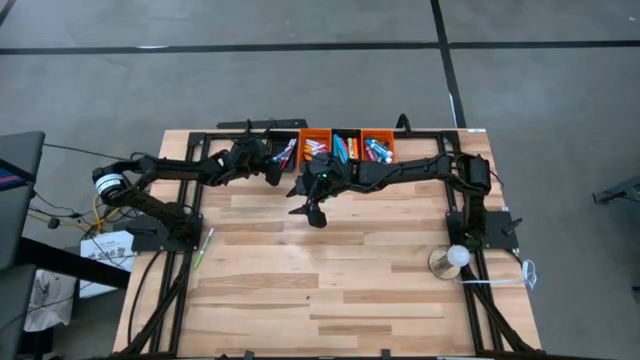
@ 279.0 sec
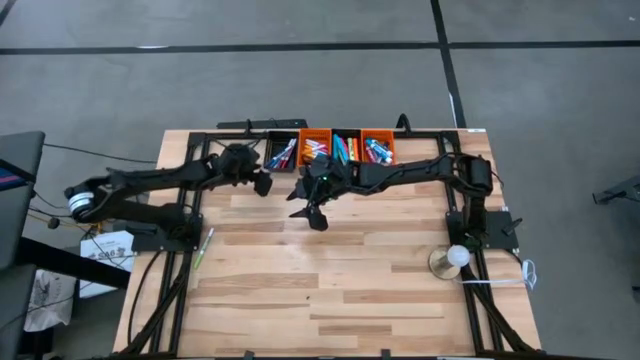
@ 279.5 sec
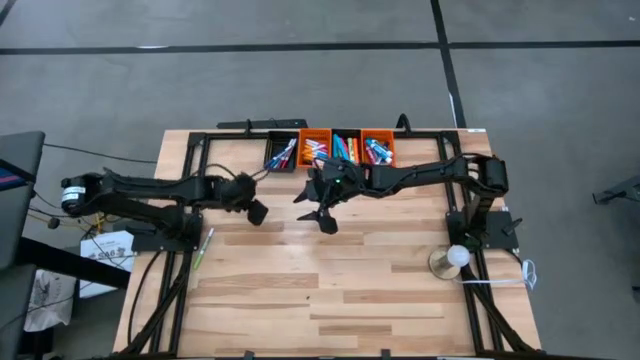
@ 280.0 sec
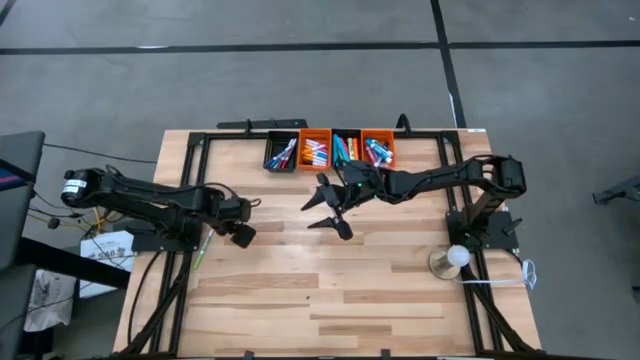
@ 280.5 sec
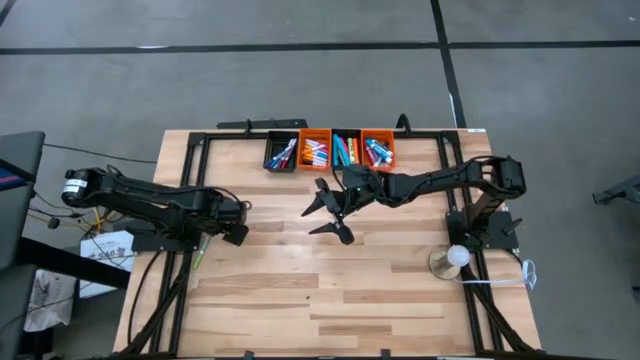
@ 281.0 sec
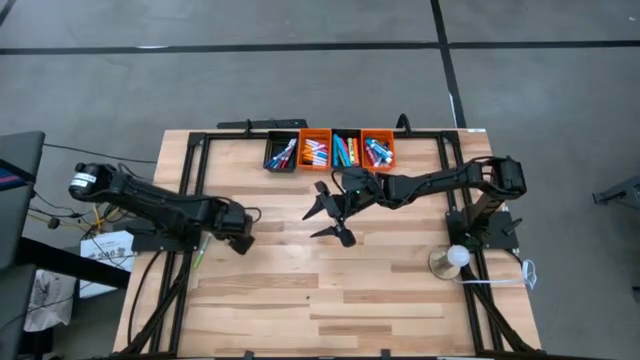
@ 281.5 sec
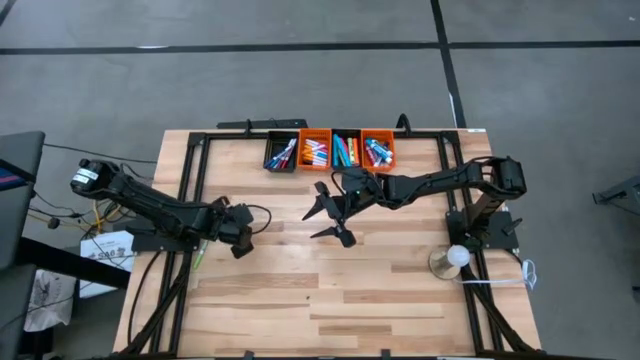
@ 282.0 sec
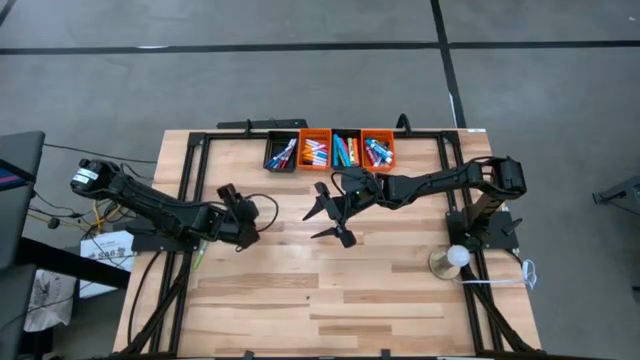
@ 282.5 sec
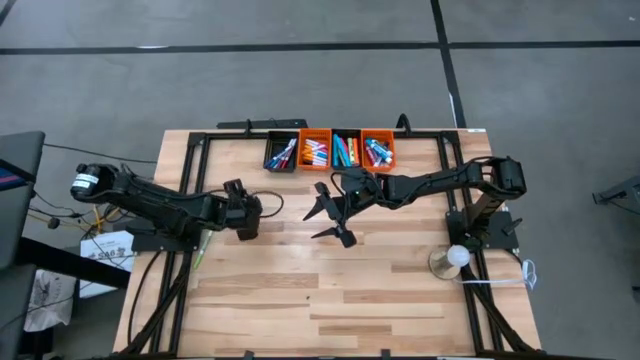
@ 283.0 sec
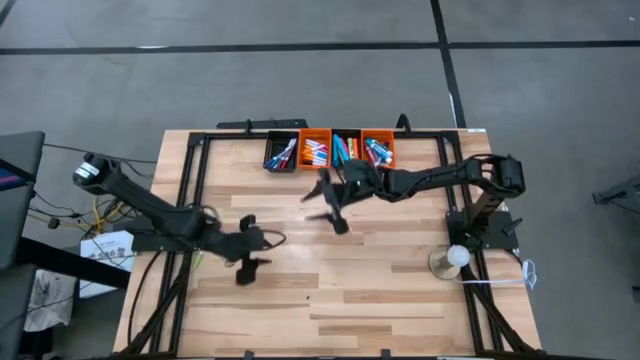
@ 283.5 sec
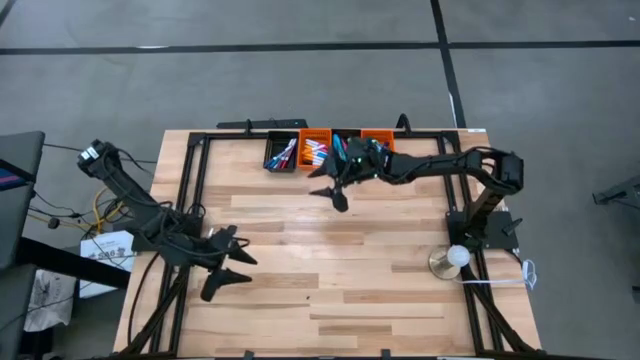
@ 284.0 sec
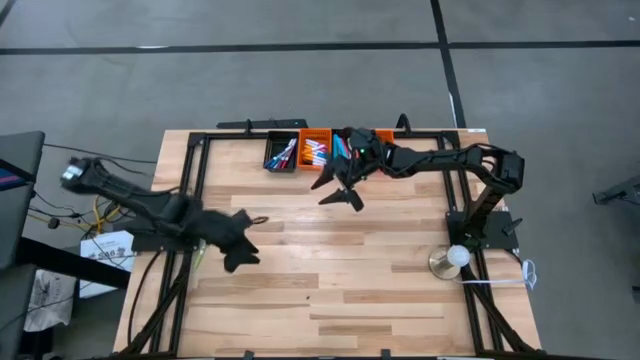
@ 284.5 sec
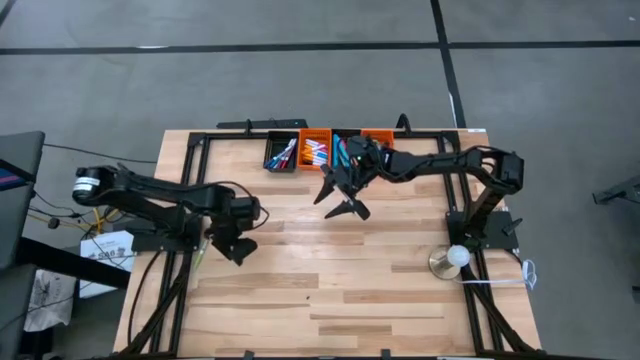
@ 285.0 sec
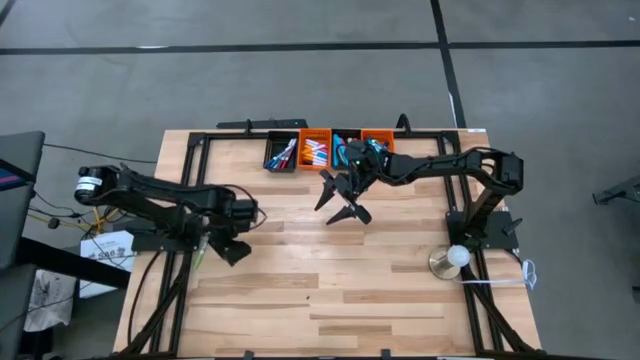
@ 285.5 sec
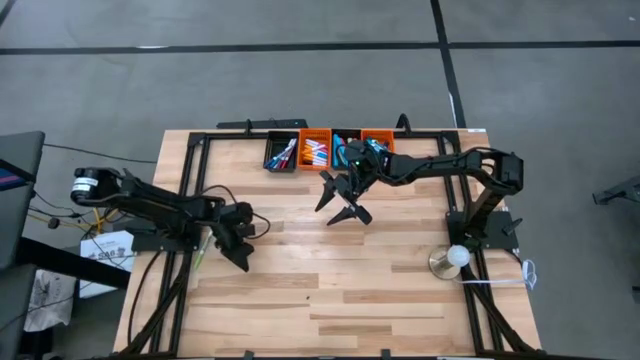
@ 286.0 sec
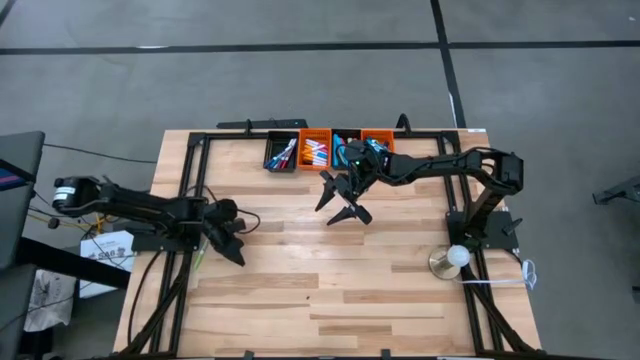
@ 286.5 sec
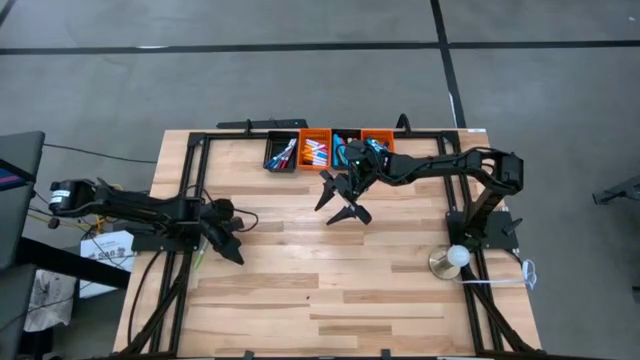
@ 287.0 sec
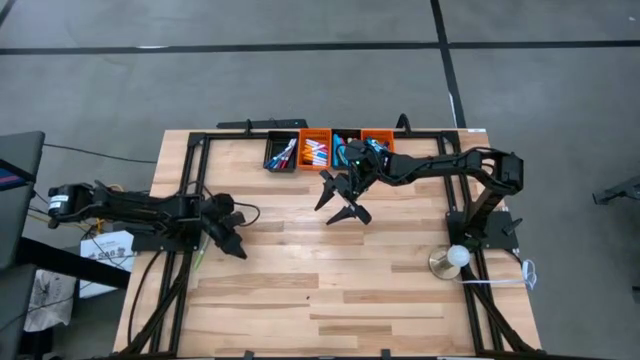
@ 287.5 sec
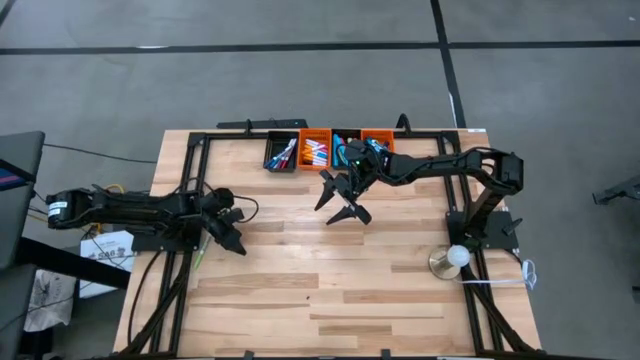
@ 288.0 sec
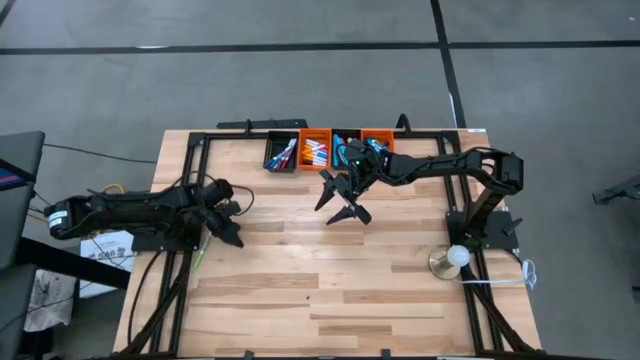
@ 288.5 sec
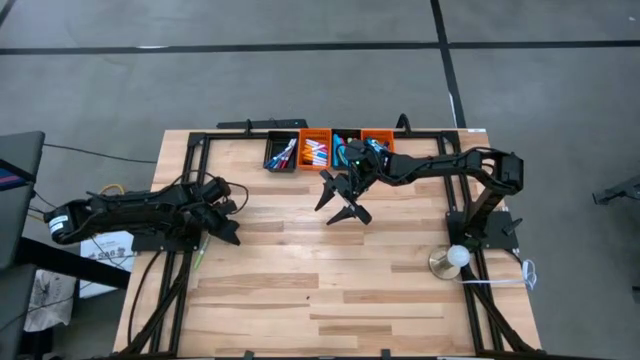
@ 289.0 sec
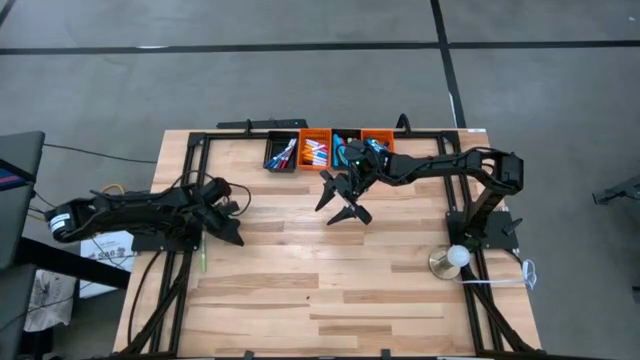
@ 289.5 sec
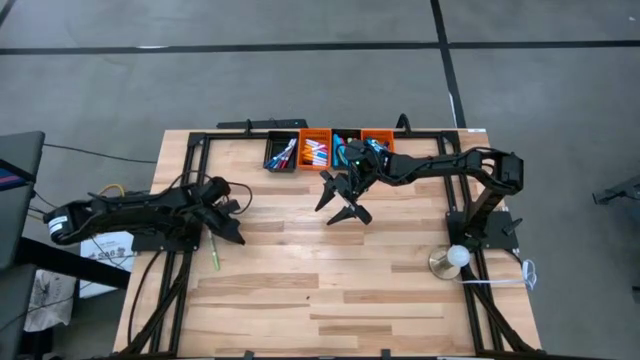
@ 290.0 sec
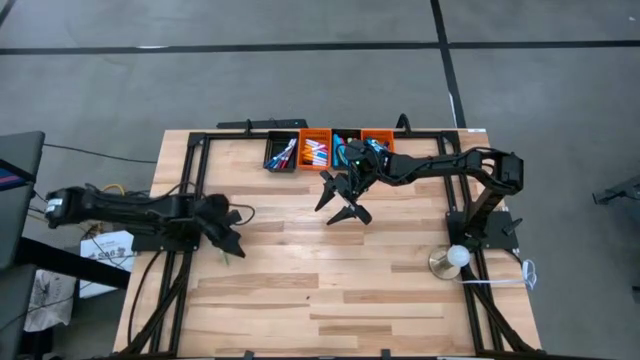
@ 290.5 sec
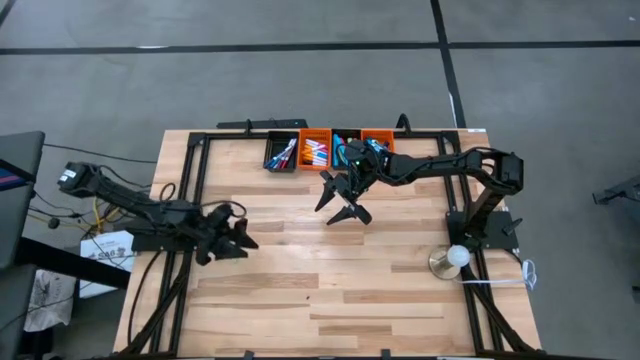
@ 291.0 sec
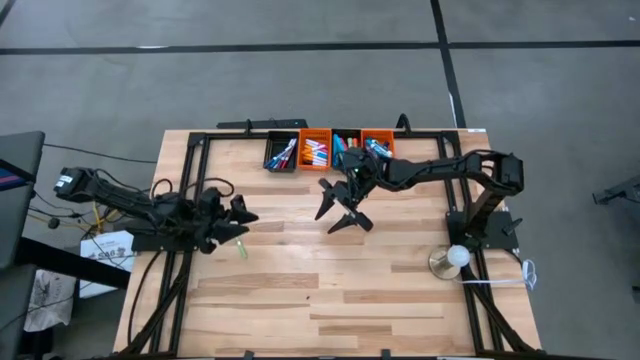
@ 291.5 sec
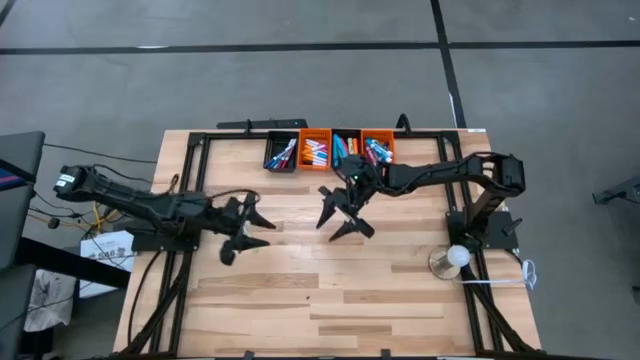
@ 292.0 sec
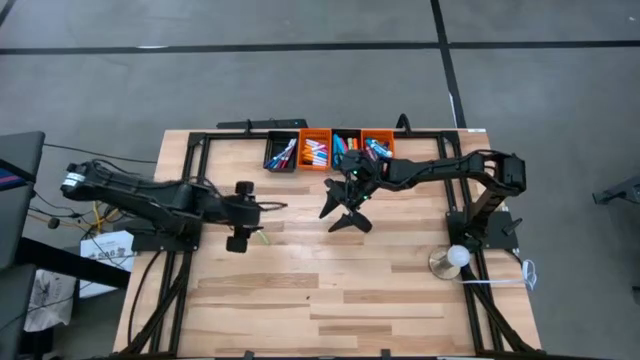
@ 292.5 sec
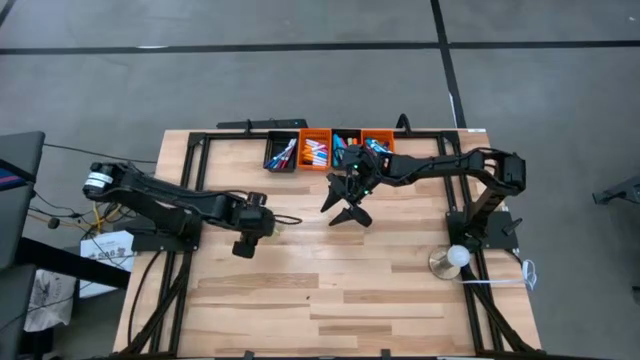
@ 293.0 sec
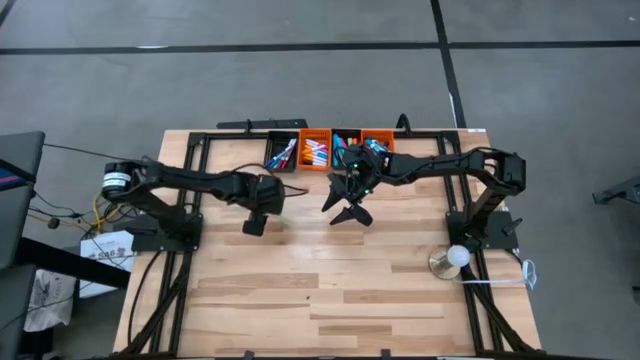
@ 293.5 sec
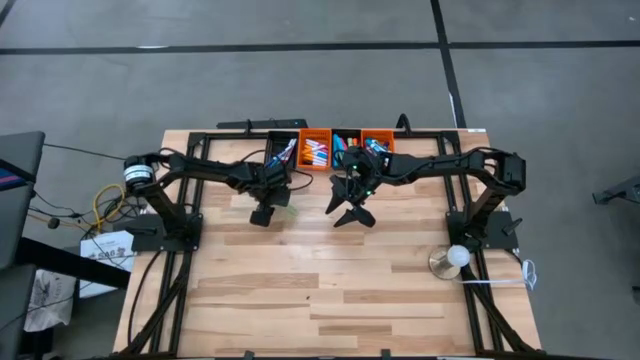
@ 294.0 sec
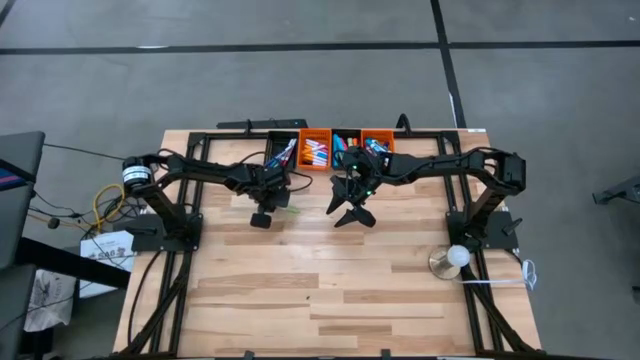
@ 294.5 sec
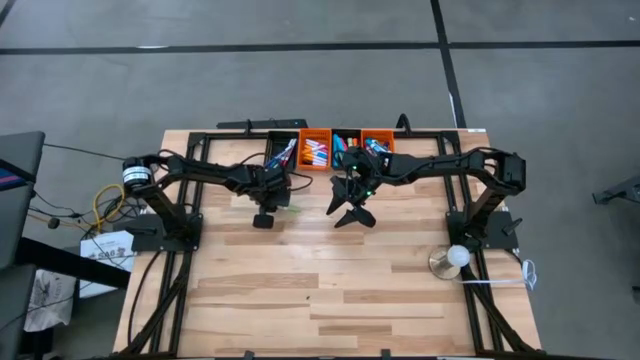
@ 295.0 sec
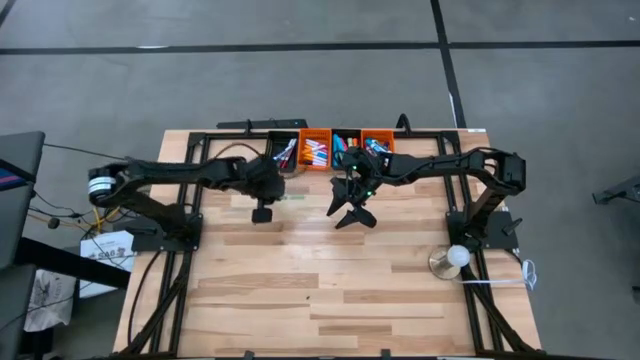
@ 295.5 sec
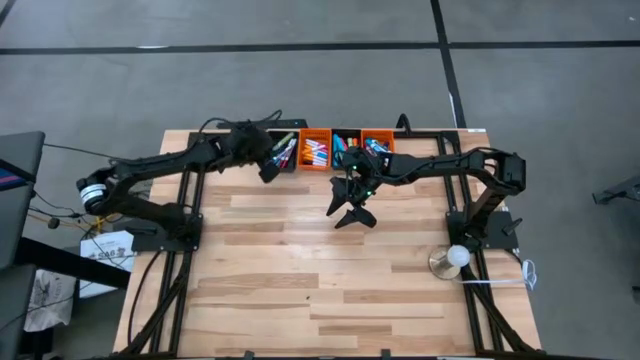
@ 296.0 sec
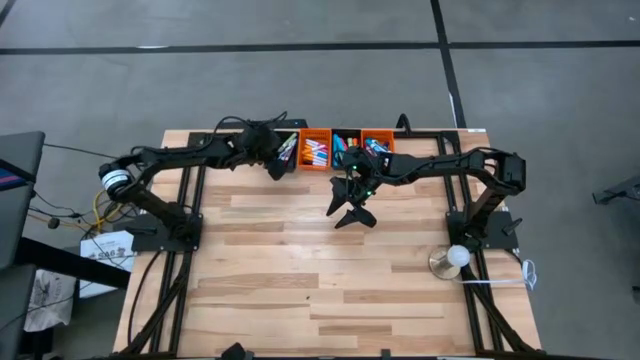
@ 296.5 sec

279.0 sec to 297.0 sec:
Task: Pick & Place Markers
Put the green and white marker pen into the left black bin

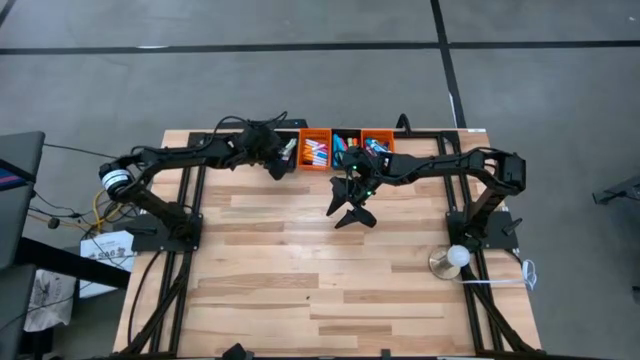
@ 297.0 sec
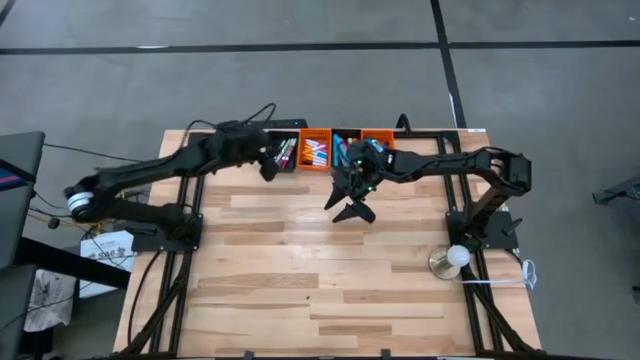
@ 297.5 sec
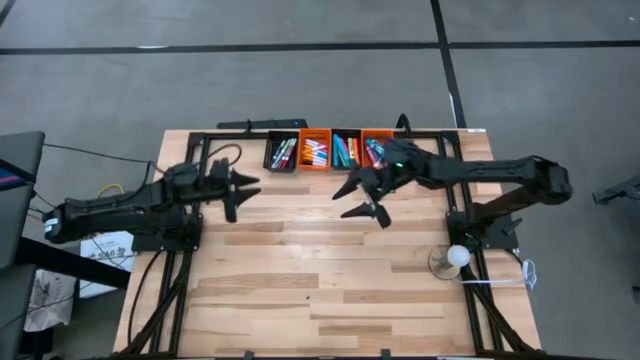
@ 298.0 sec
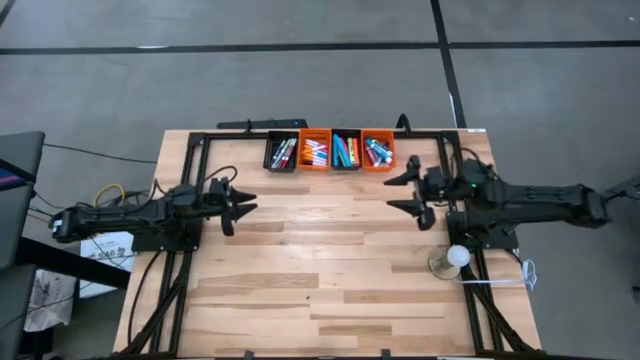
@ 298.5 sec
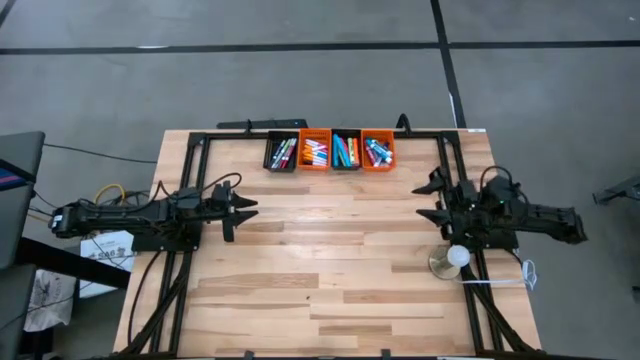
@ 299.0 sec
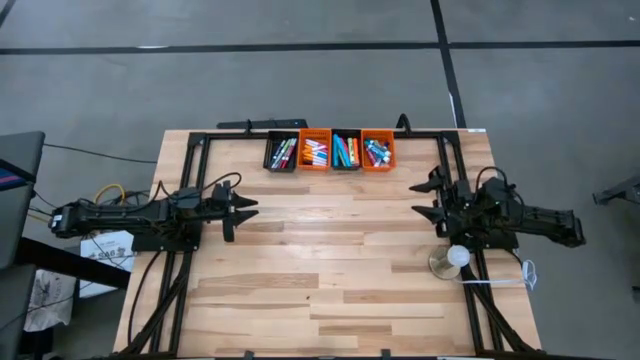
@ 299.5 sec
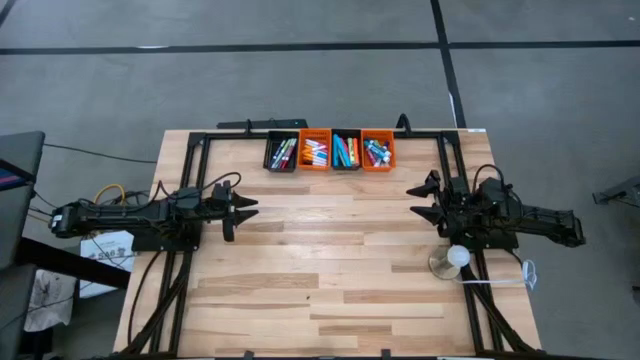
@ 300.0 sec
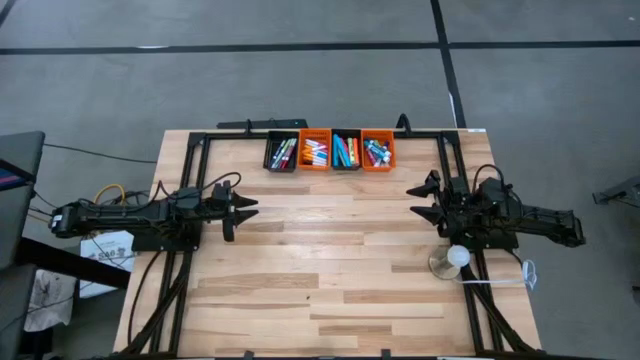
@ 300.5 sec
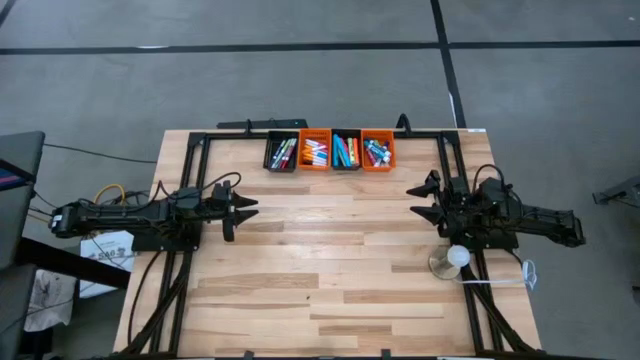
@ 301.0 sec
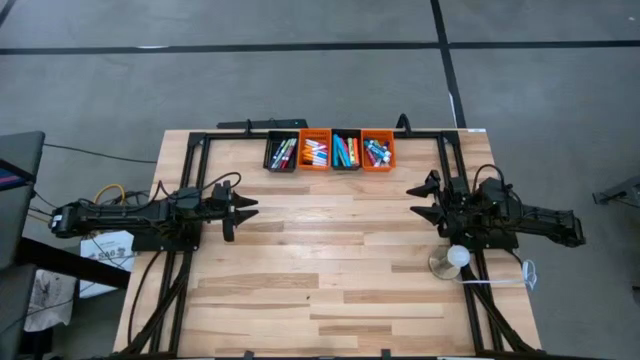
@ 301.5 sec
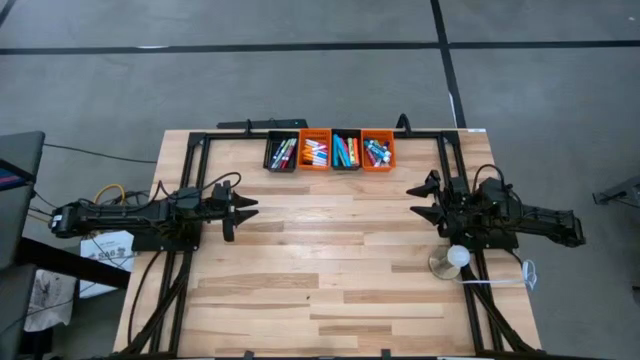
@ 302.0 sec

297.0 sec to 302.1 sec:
Return to Home Position
